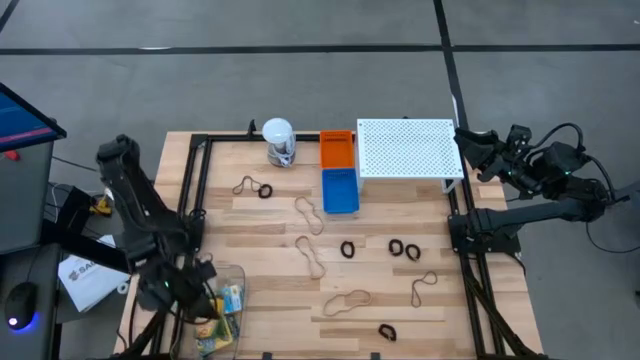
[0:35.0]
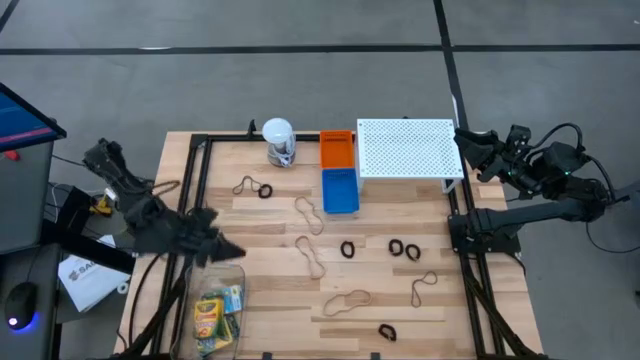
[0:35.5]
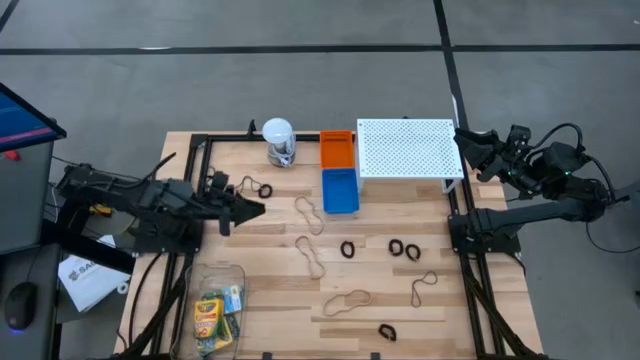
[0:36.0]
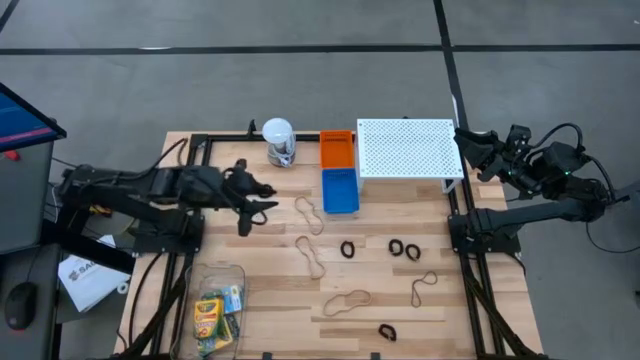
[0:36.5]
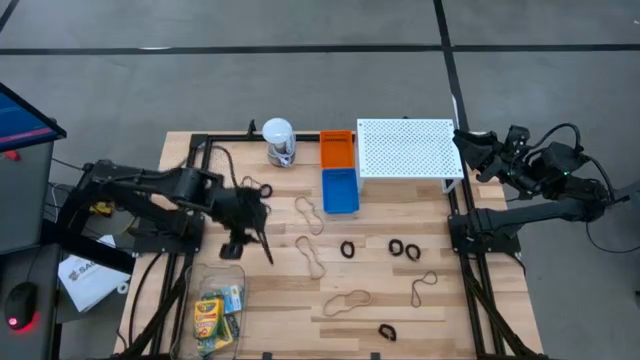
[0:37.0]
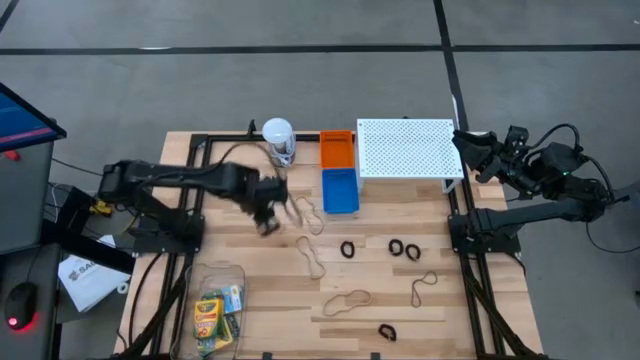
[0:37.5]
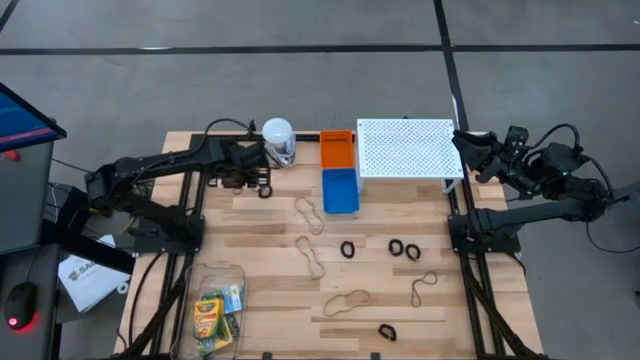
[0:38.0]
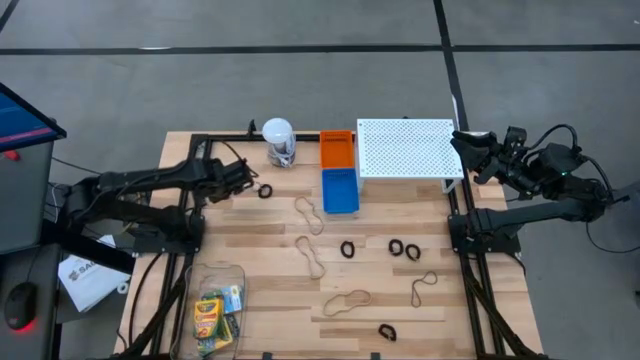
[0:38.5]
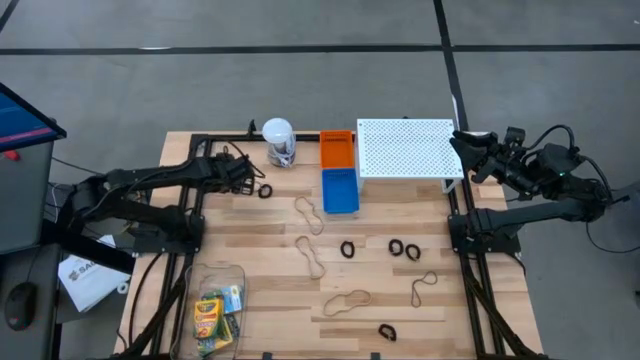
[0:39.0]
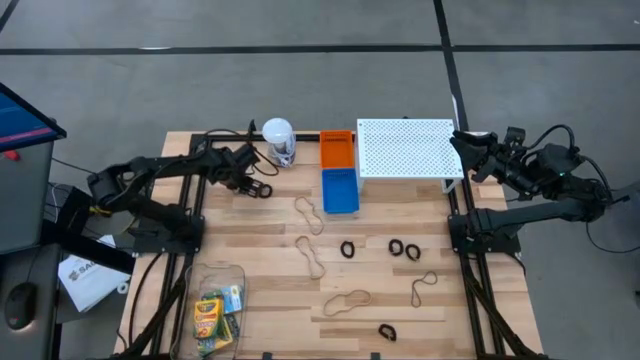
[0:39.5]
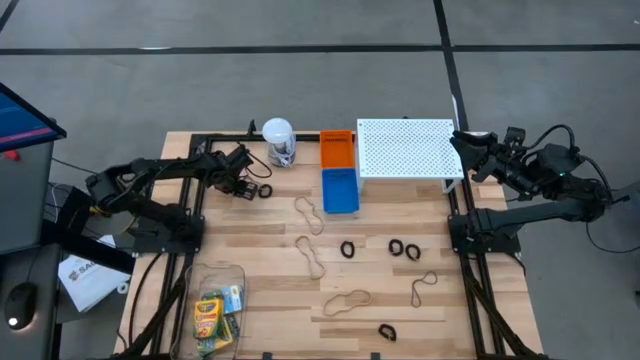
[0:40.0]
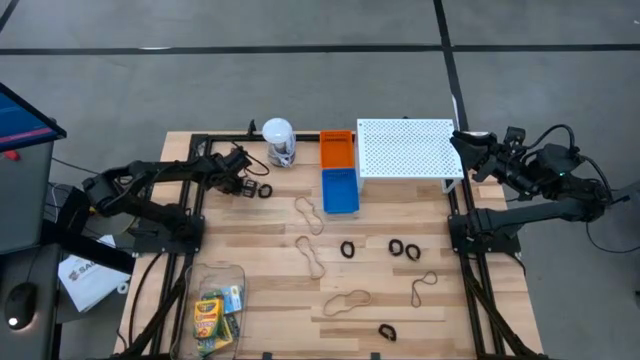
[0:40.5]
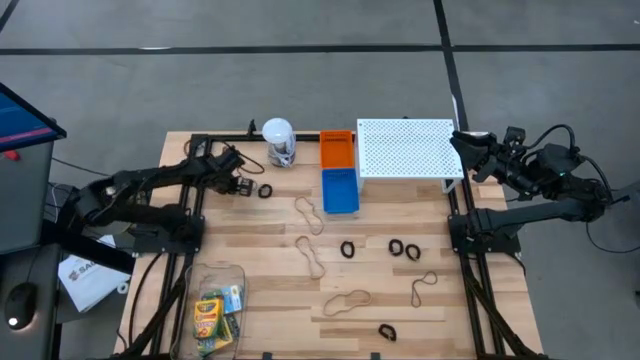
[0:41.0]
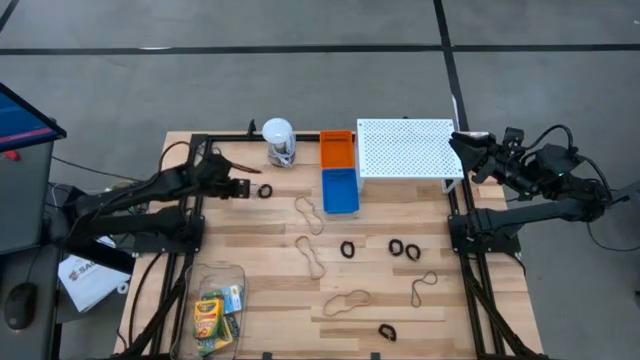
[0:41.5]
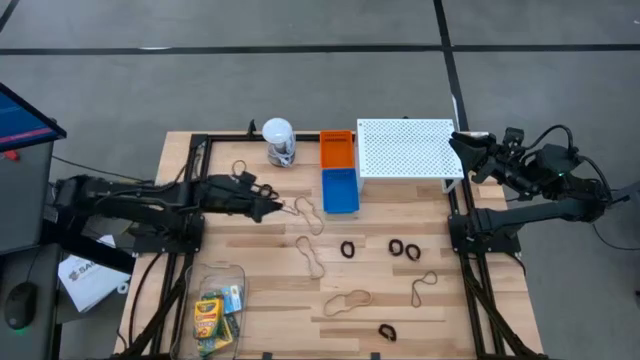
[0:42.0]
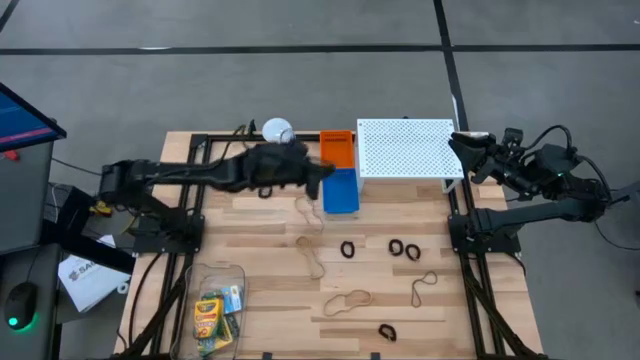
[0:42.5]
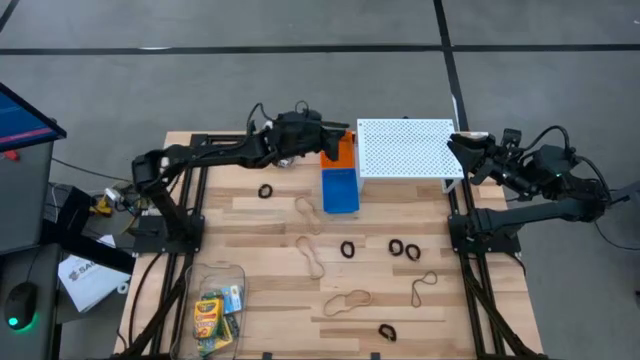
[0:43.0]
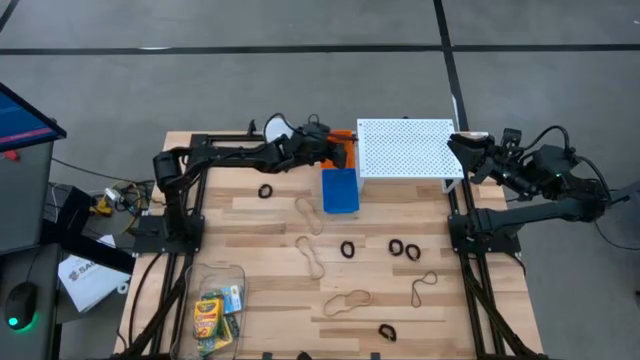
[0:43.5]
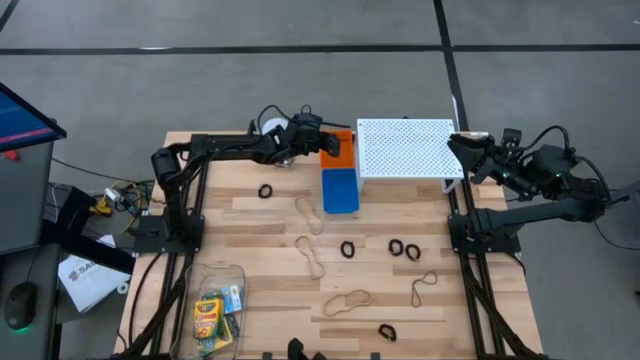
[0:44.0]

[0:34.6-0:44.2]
Task: Pick & Place Office Desk Supplies
Put the purple rubber band into the orange basket

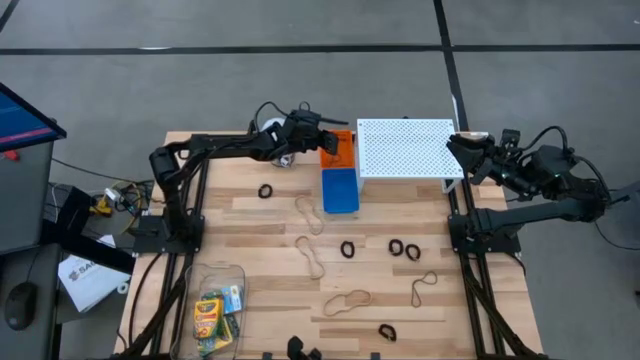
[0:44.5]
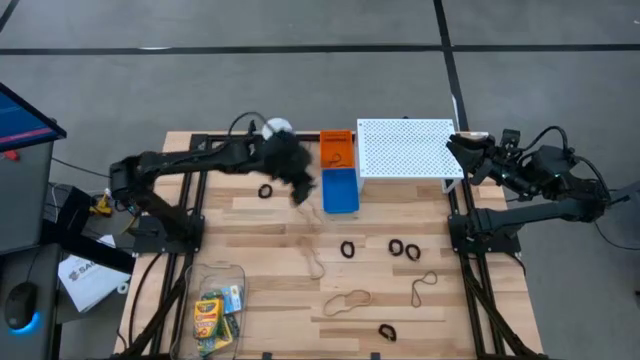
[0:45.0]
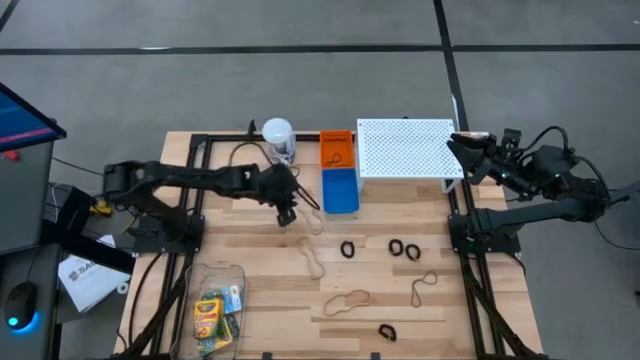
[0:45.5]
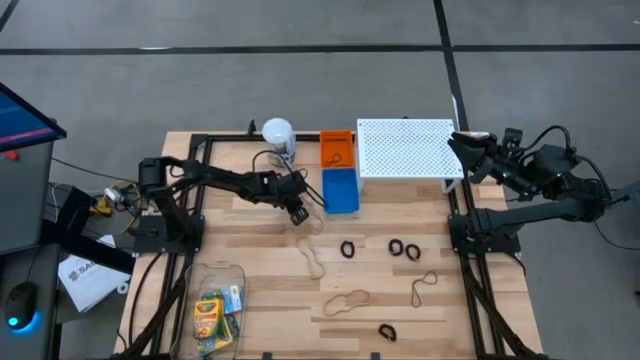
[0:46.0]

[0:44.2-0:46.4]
Put the brown rubber band into the orange basket

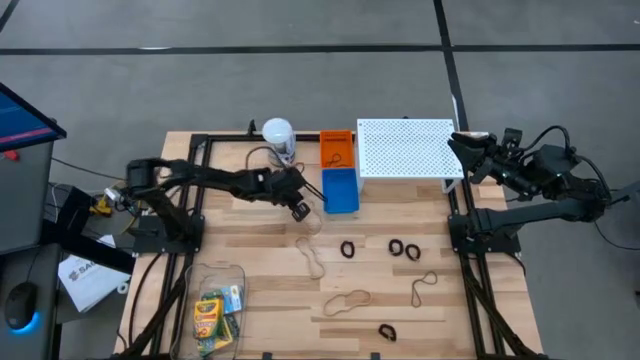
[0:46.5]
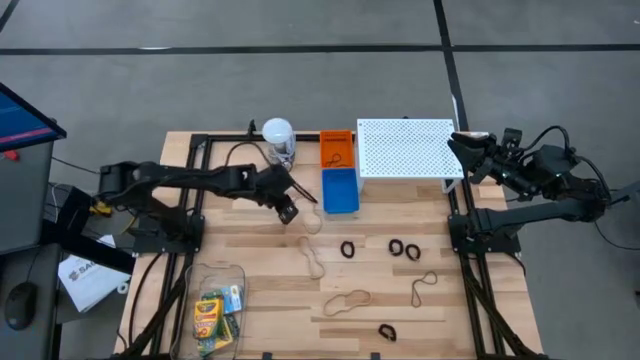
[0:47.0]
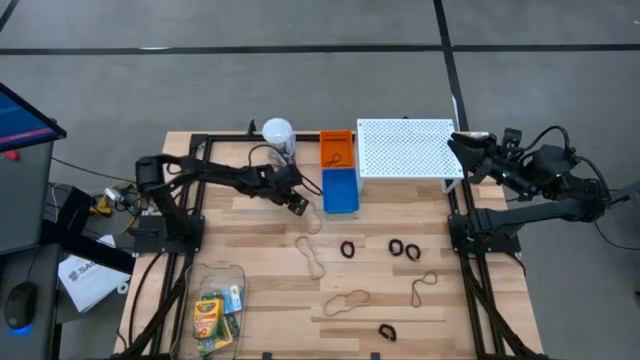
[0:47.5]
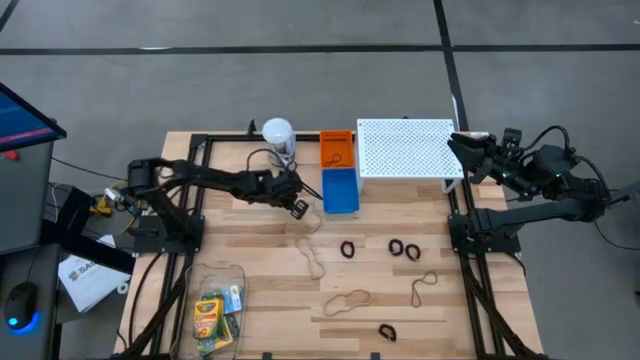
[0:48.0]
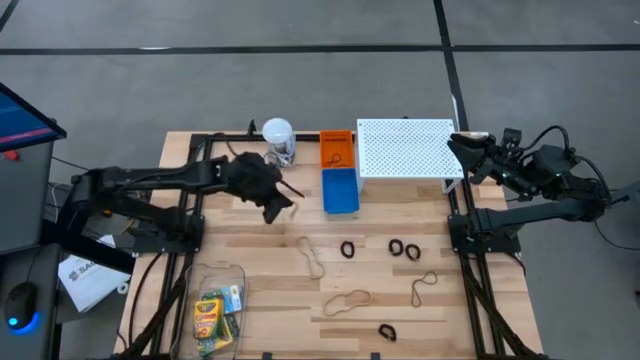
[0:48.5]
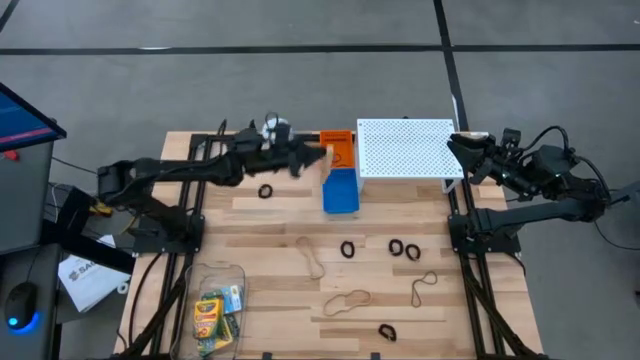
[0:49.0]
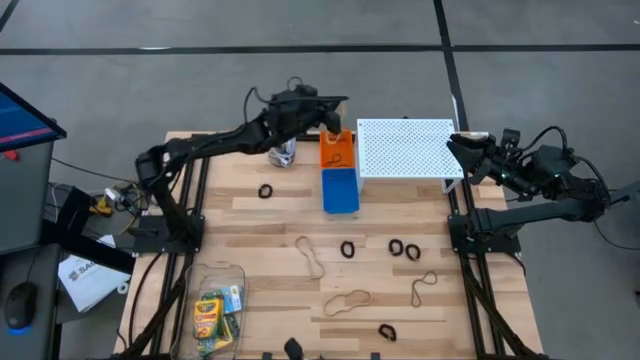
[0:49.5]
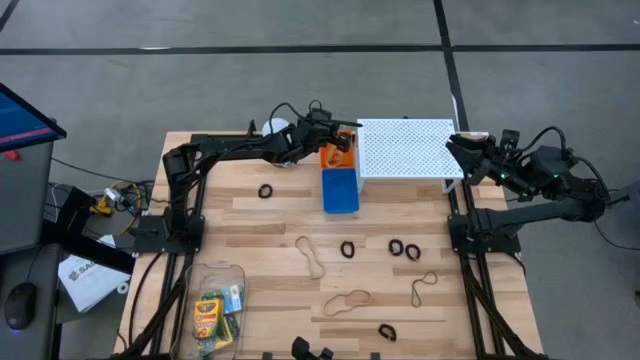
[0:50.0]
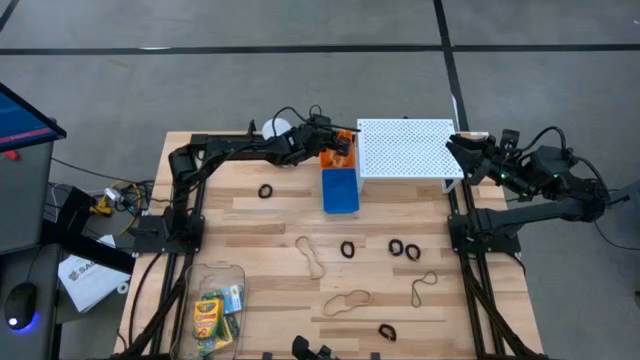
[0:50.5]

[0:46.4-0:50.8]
Put the brown rubber band into the orange basket

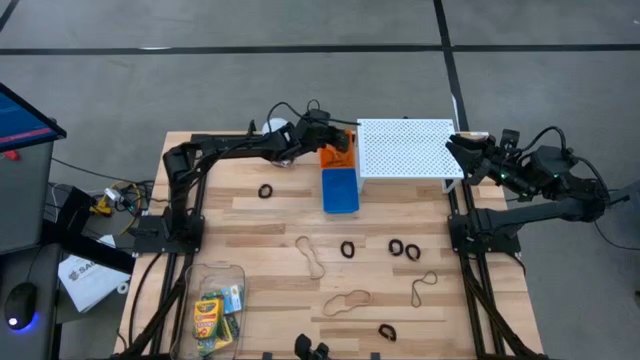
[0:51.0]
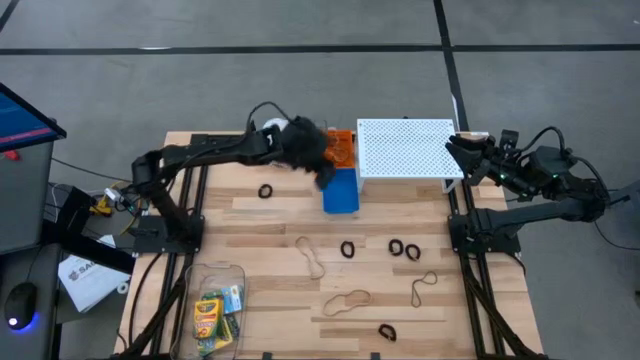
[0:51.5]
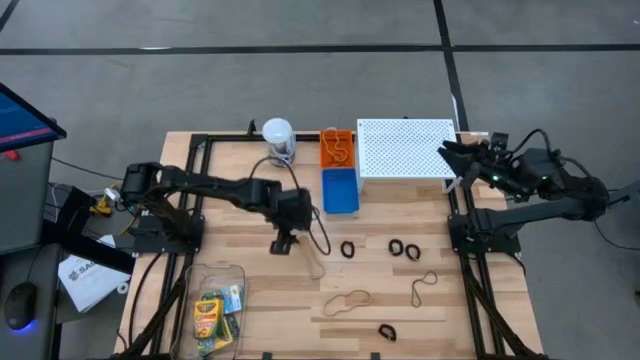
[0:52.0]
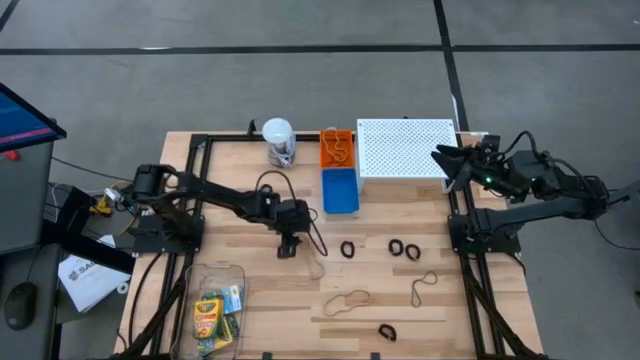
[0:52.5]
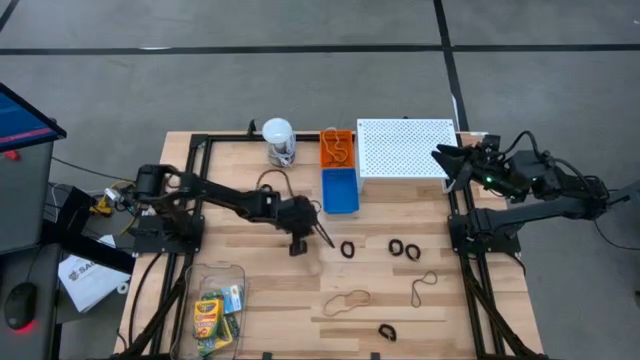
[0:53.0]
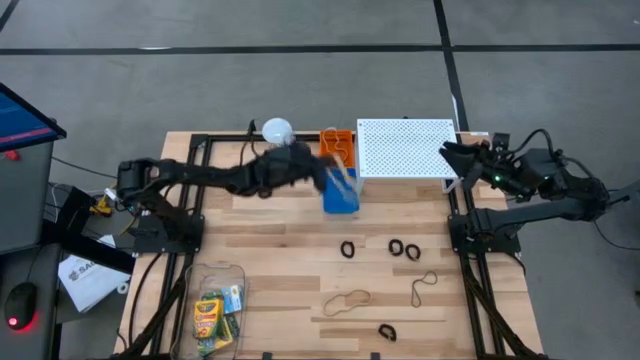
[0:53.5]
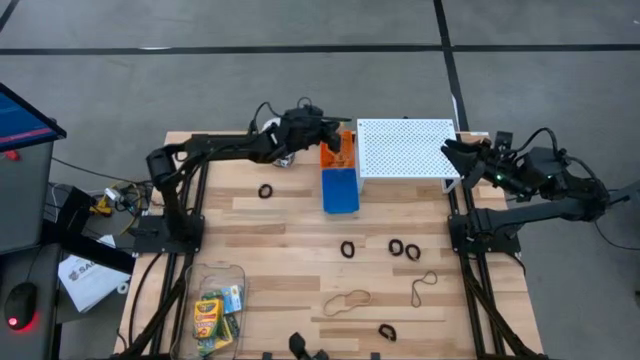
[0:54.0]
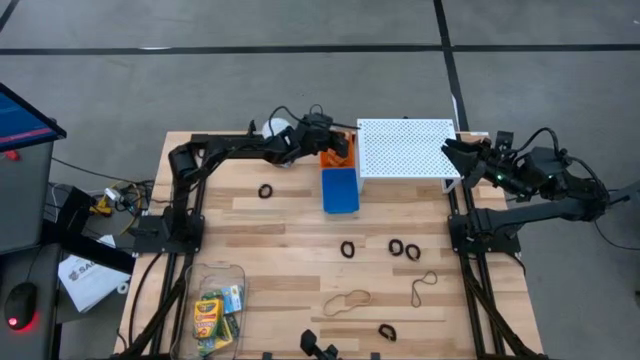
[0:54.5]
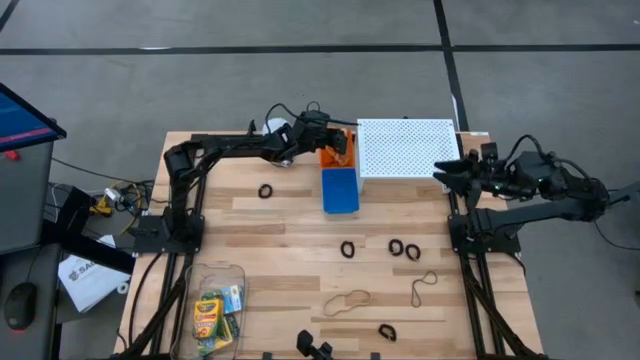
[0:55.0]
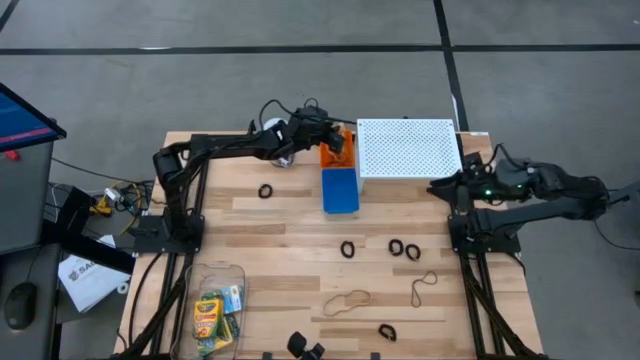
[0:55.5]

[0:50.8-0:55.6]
Put the brown rubber band into the orange basket
